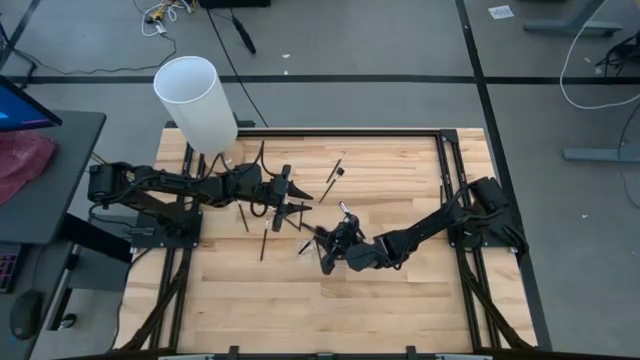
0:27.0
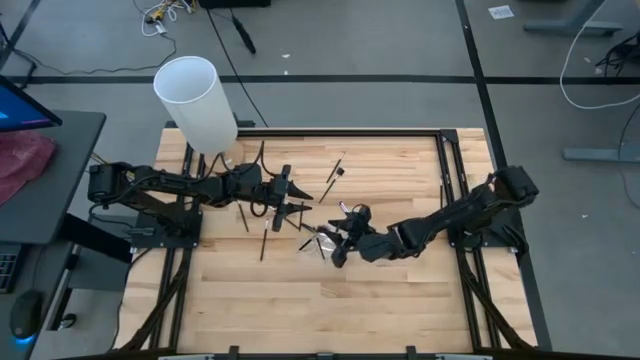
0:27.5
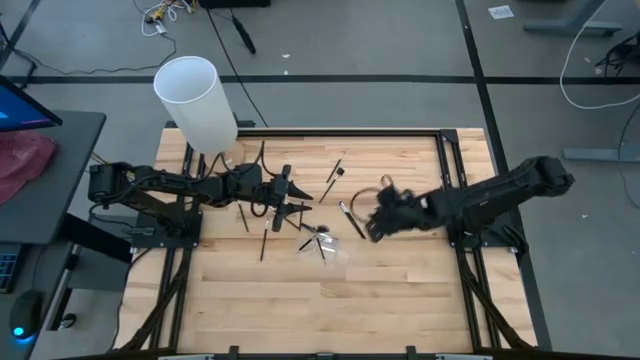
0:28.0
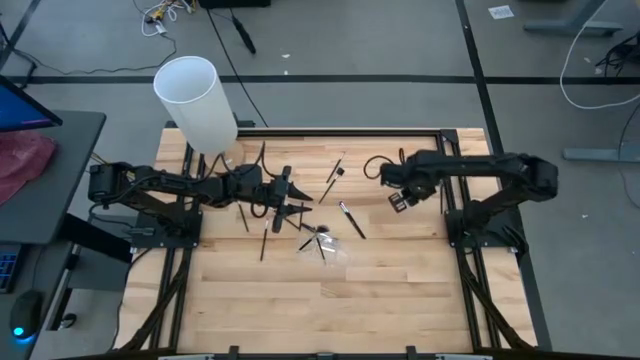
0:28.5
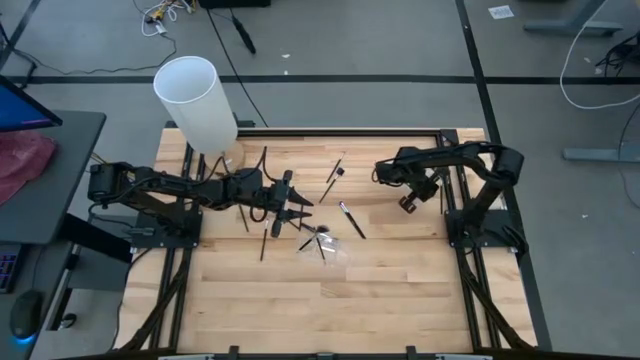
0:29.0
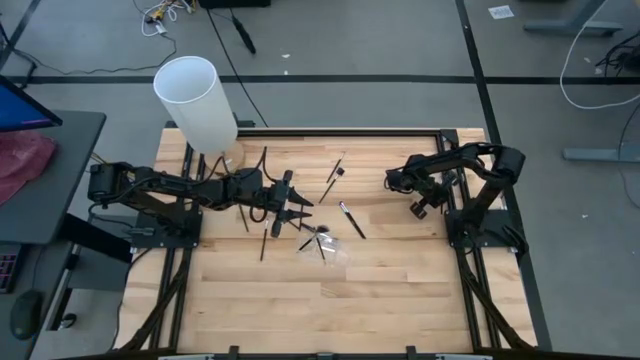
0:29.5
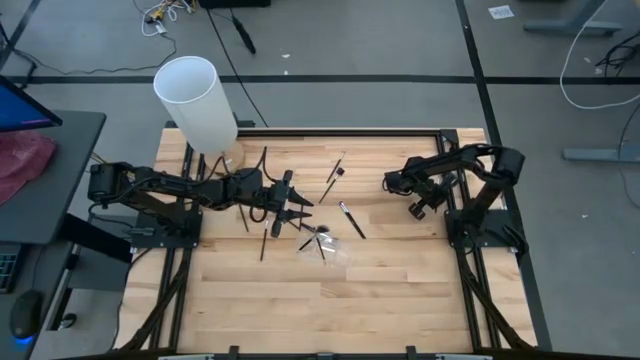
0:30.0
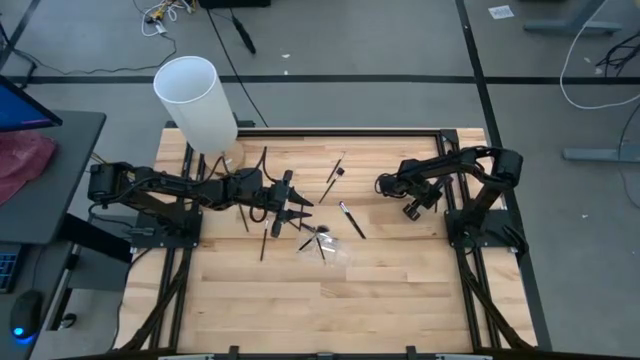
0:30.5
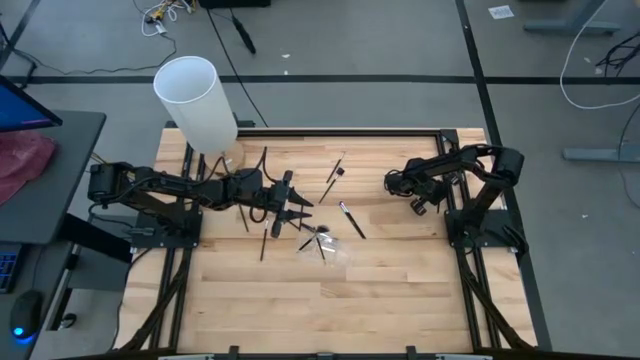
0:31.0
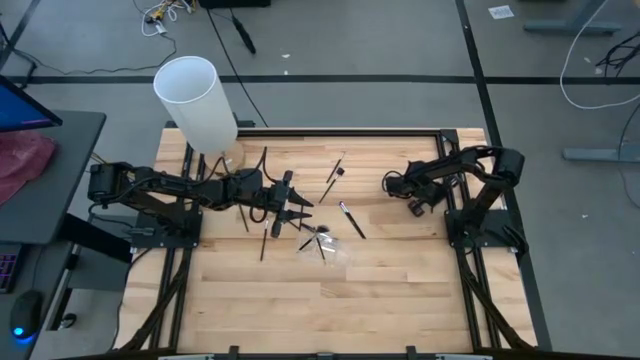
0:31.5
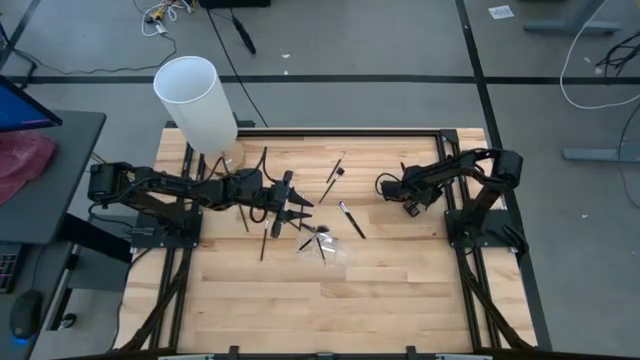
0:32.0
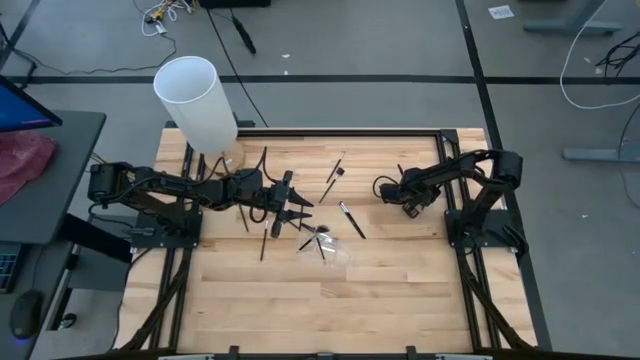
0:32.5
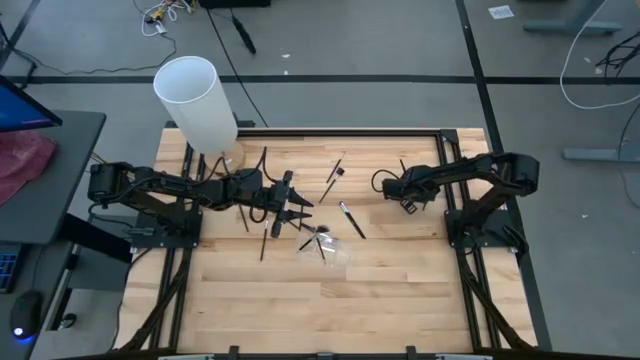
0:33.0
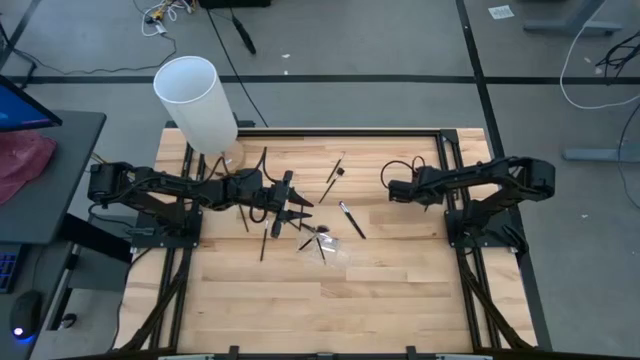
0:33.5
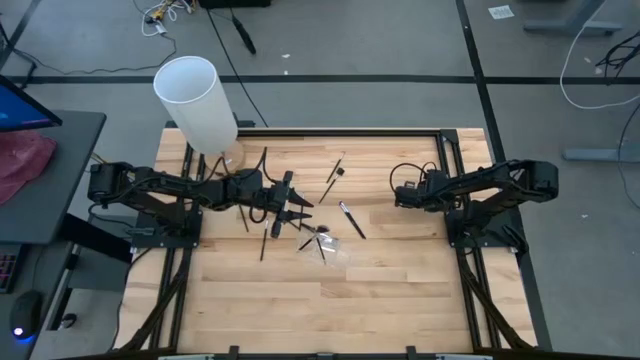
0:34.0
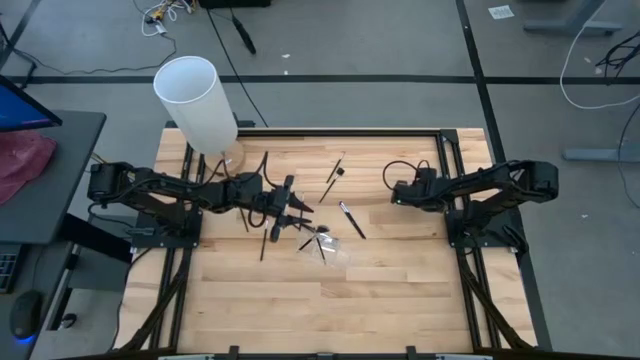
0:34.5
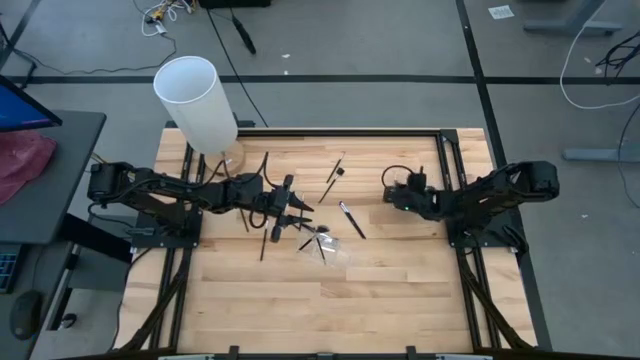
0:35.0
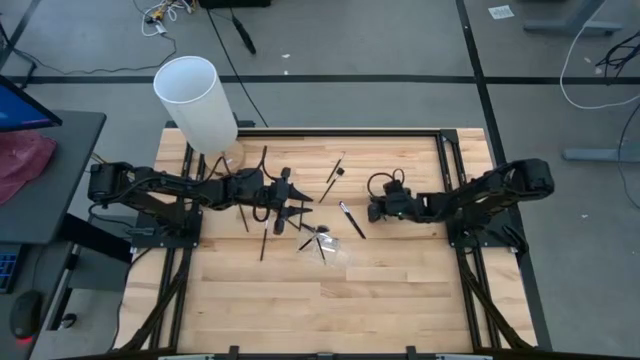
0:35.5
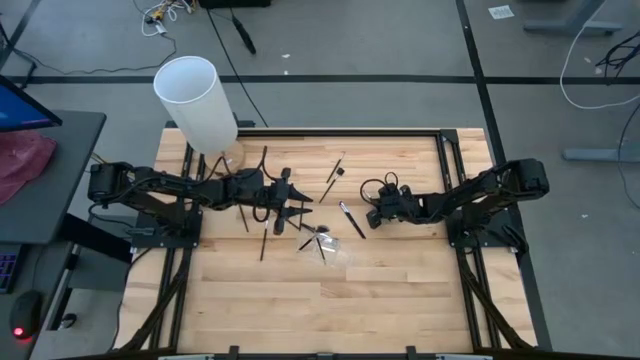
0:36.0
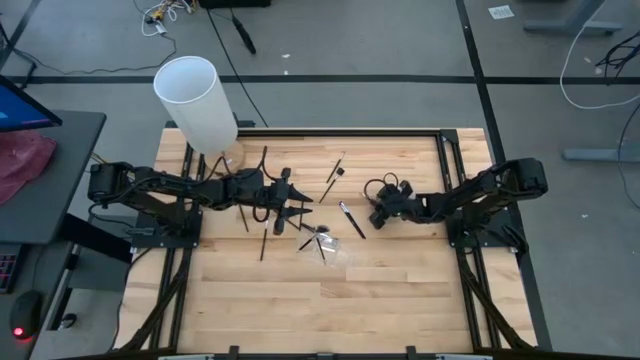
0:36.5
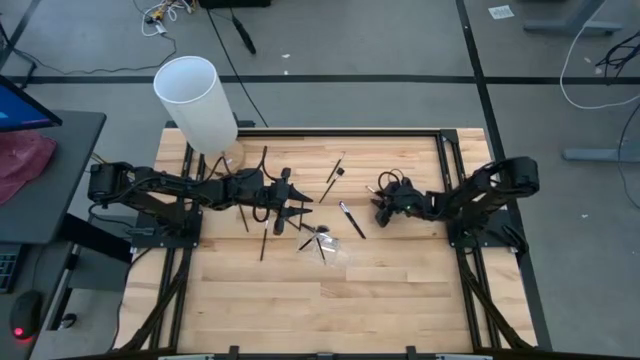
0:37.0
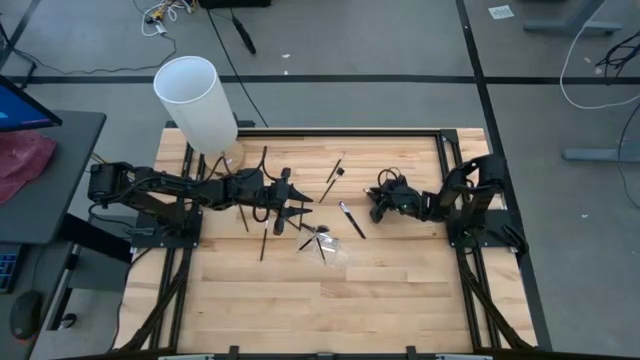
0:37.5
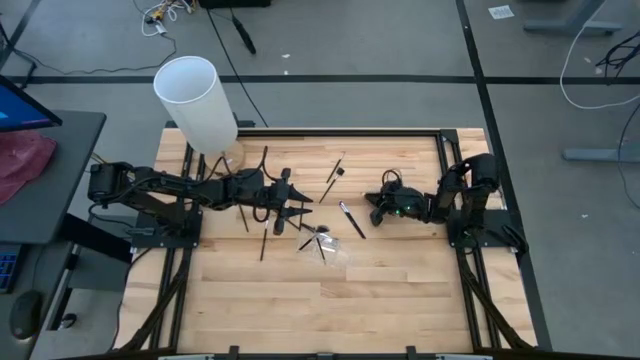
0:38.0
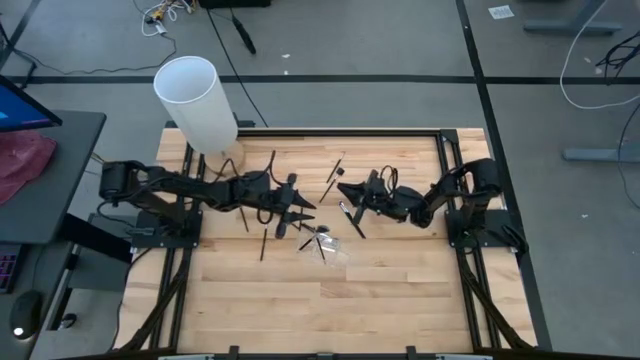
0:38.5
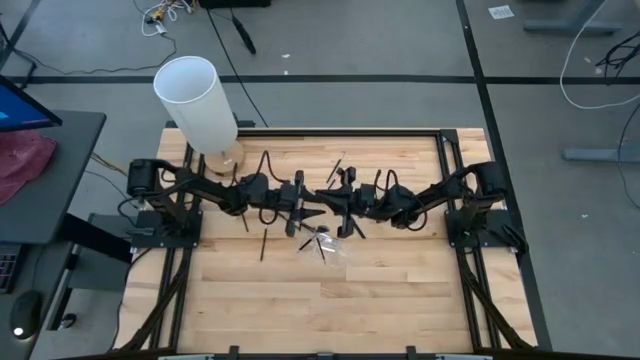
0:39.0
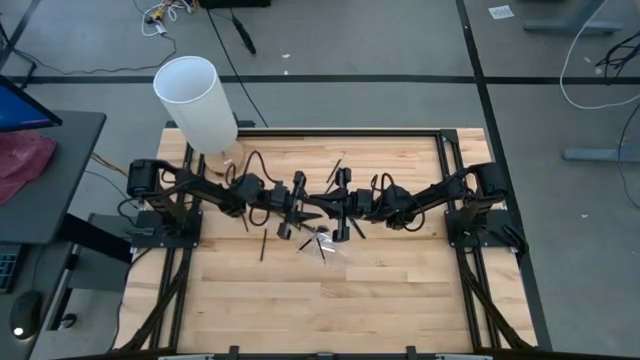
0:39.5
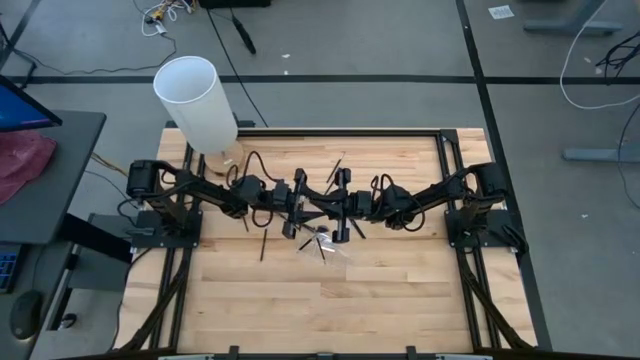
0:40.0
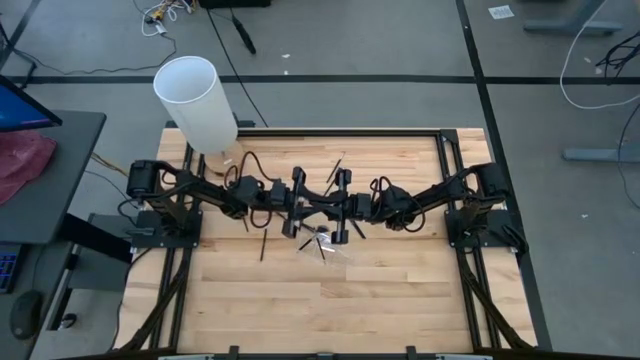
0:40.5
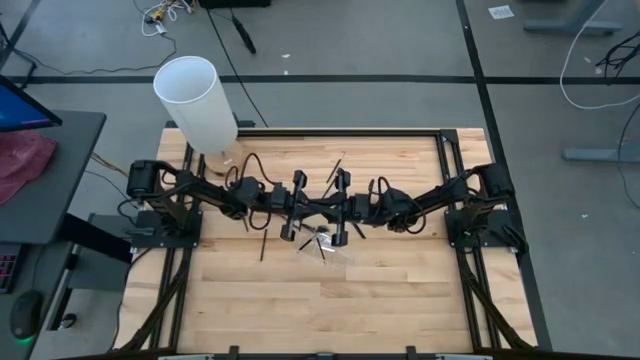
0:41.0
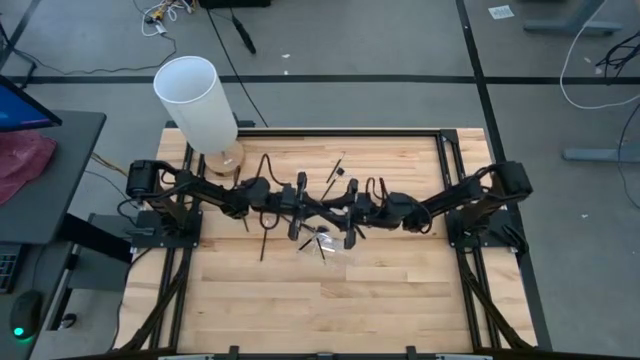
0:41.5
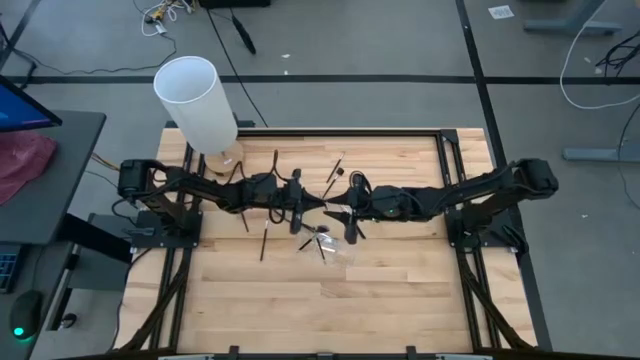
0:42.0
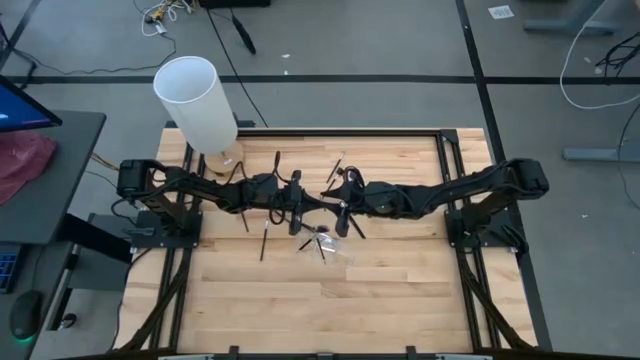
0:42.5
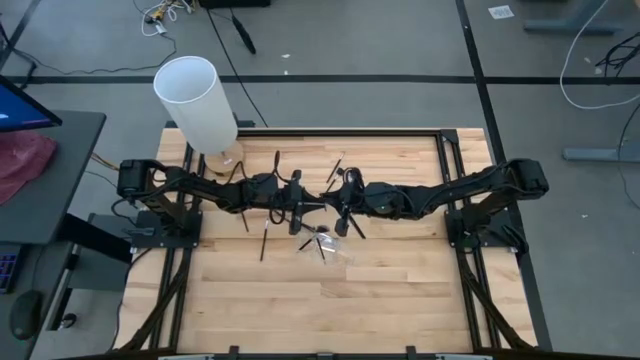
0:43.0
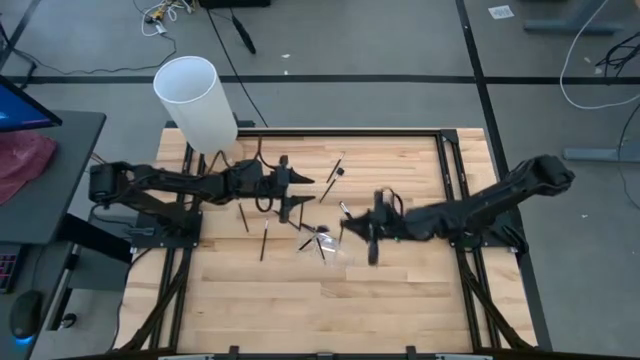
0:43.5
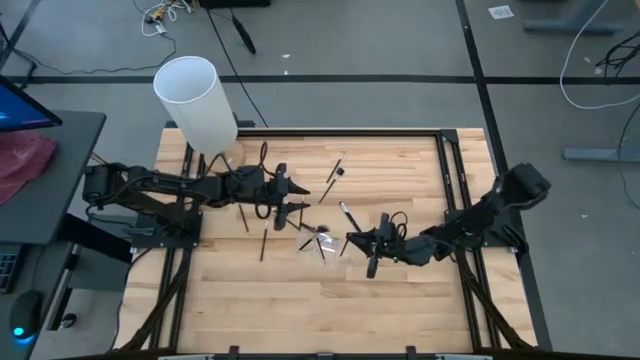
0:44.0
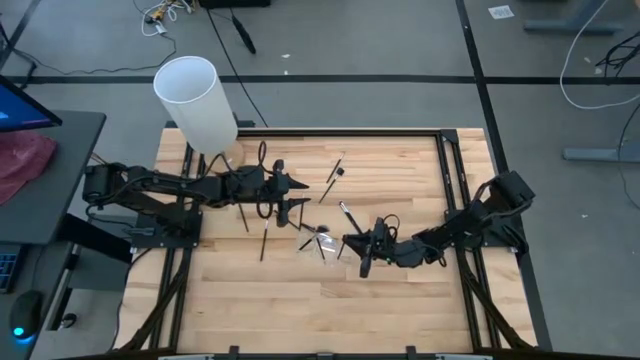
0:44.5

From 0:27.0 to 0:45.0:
Task: Put items in baskets/containers
Put the black eyeshadow brush into the transparent organizer

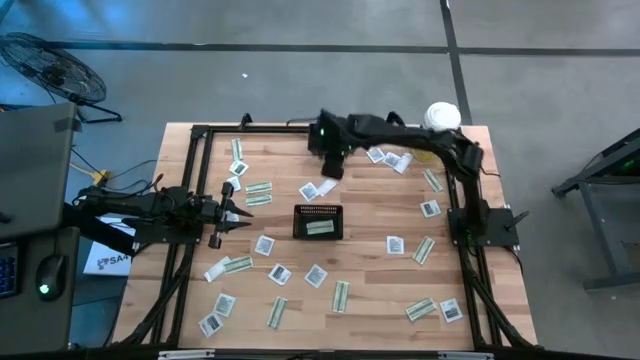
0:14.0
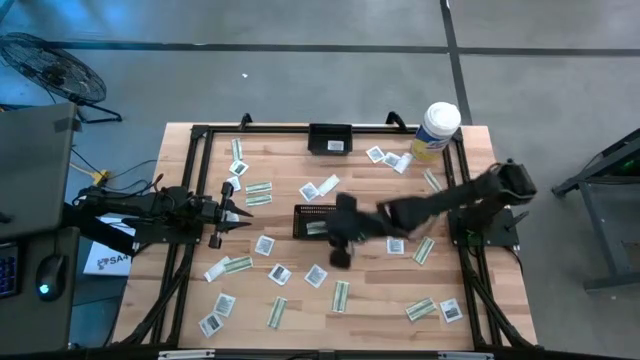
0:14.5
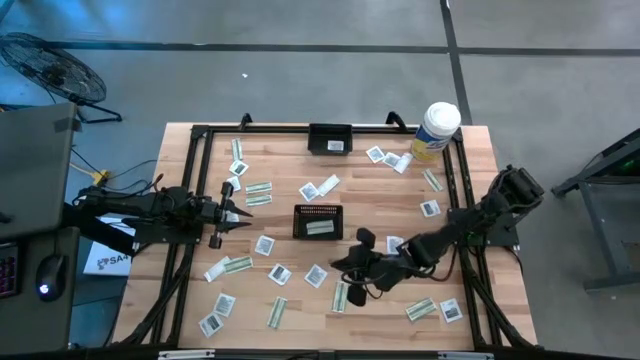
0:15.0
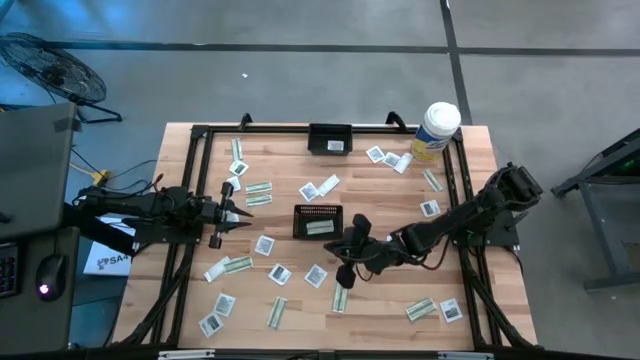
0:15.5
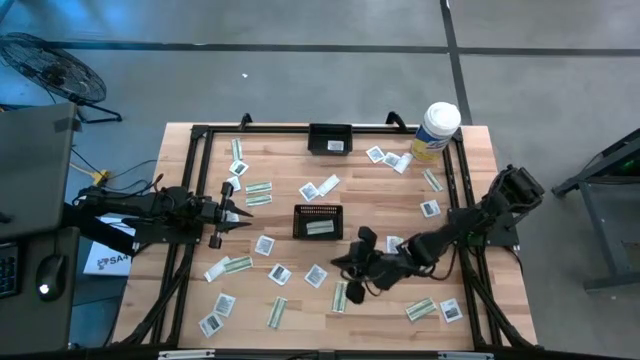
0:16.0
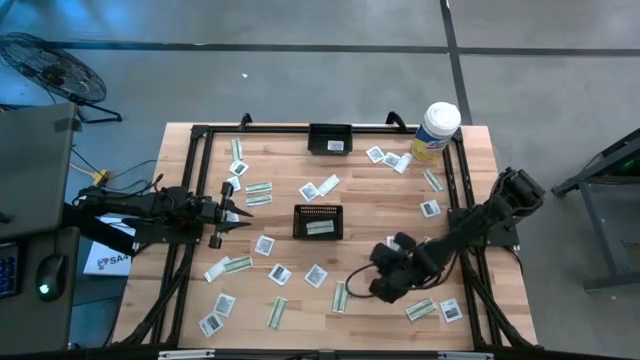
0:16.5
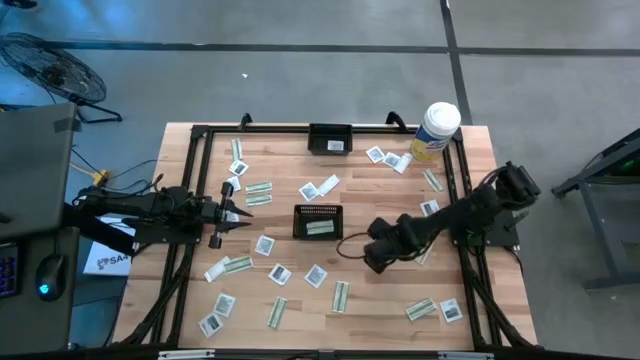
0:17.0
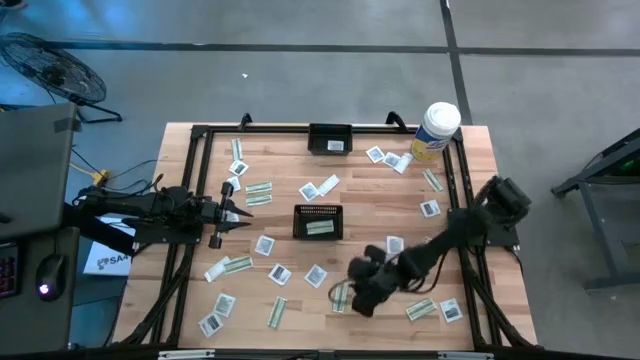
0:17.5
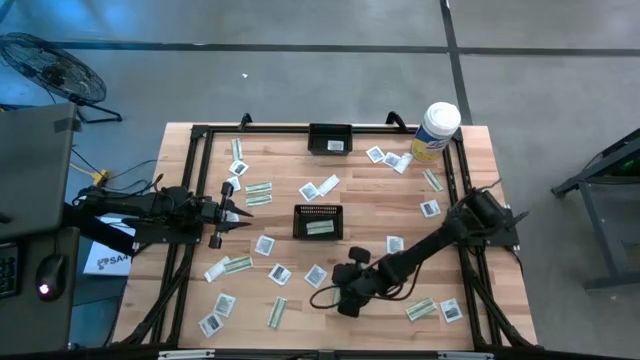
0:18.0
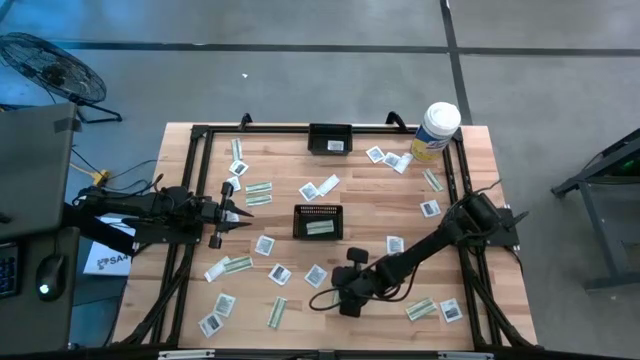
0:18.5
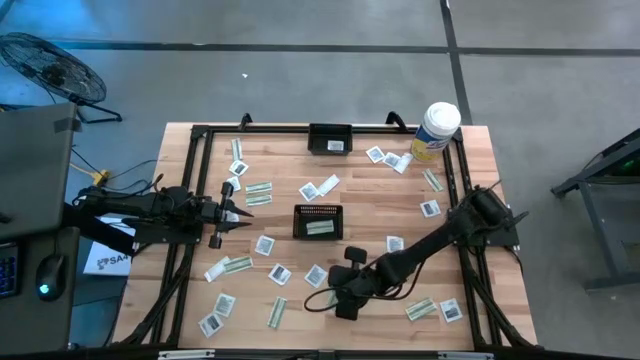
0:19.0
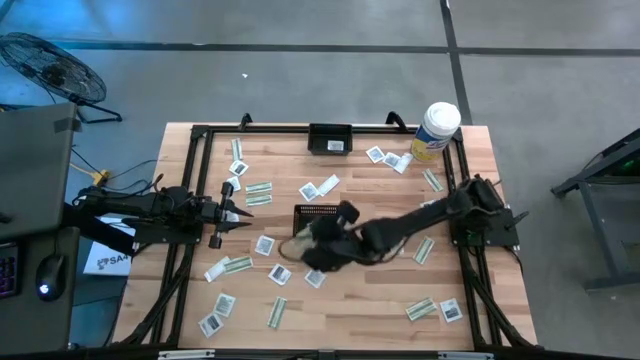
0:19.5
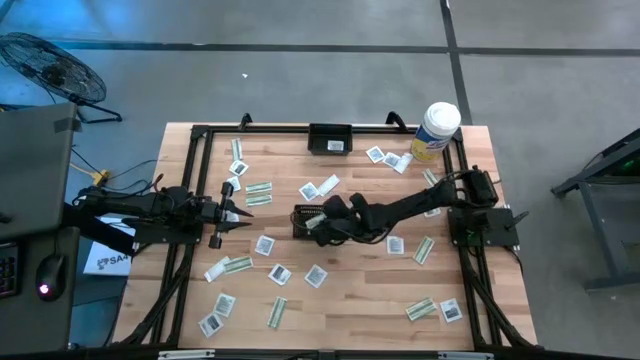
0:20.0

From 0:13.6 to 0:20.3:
Task: Pick & Place First Aid Supplies
Put the bandage into the bottom black basket
